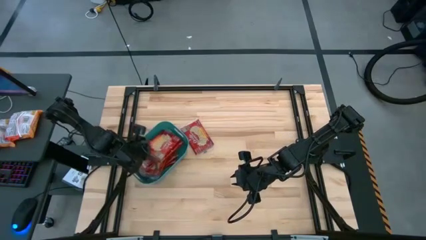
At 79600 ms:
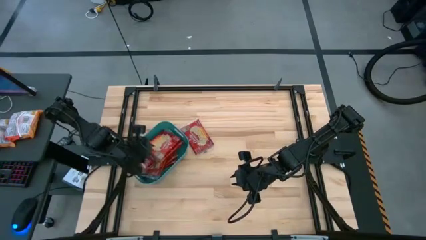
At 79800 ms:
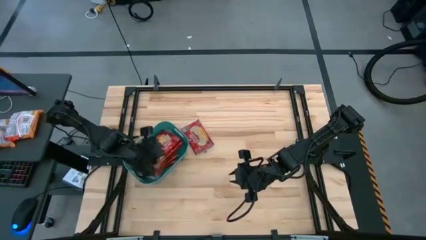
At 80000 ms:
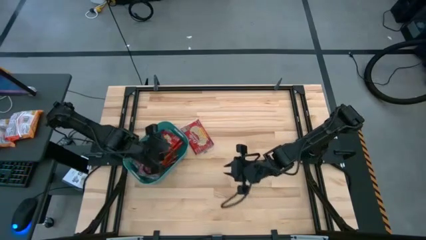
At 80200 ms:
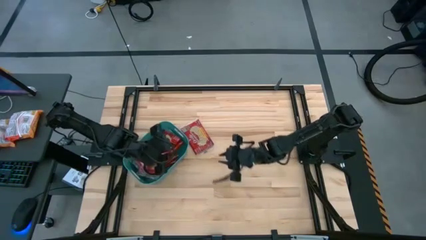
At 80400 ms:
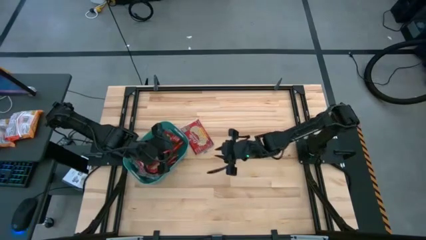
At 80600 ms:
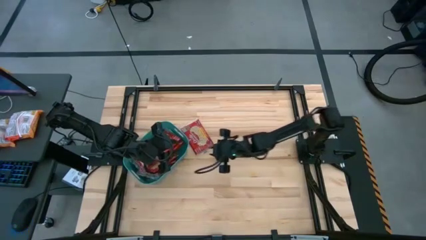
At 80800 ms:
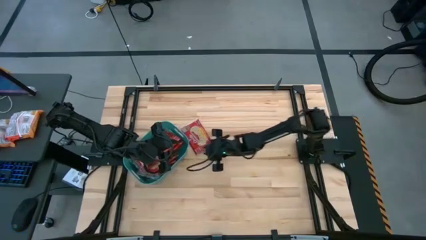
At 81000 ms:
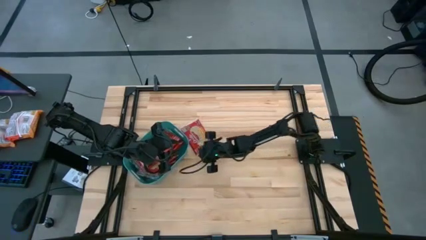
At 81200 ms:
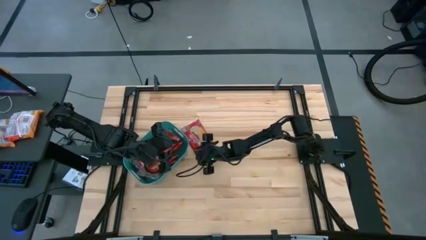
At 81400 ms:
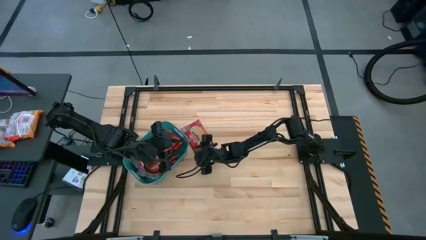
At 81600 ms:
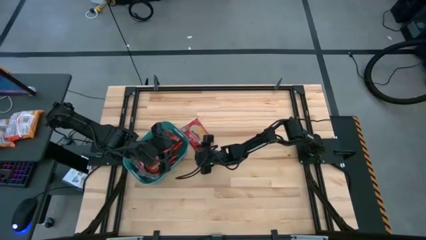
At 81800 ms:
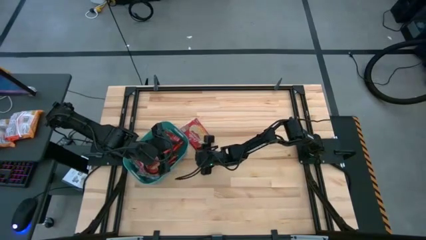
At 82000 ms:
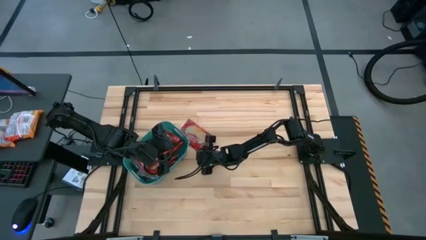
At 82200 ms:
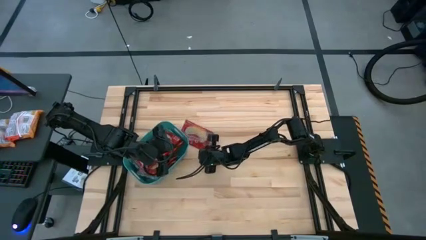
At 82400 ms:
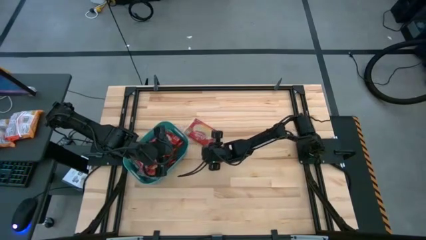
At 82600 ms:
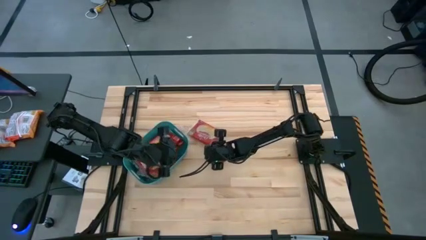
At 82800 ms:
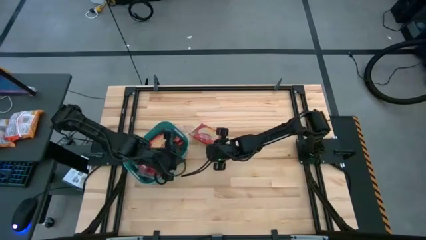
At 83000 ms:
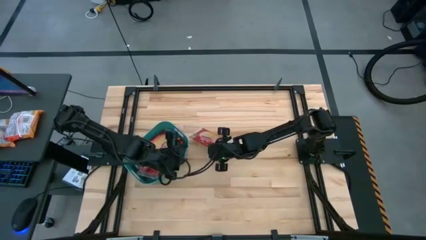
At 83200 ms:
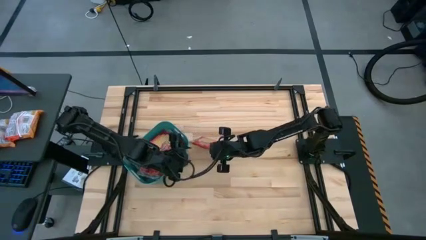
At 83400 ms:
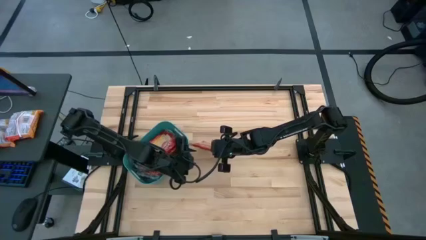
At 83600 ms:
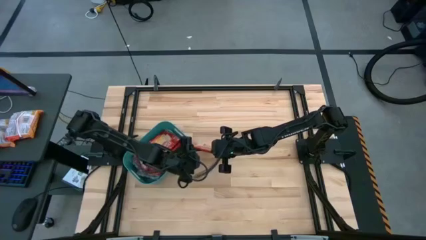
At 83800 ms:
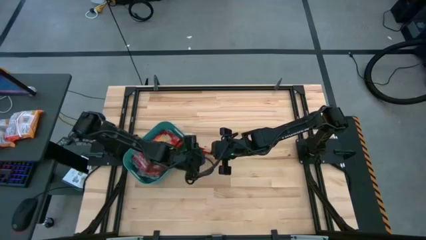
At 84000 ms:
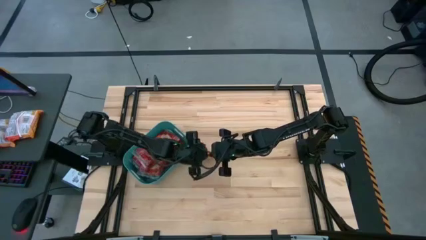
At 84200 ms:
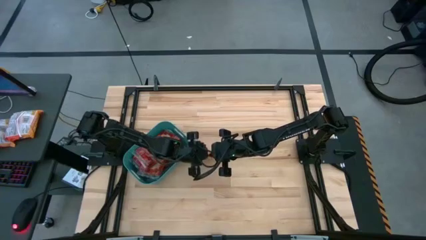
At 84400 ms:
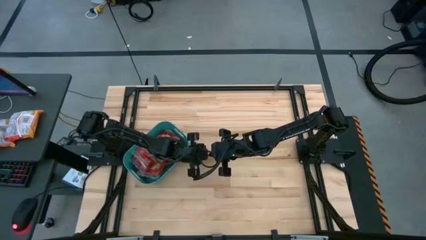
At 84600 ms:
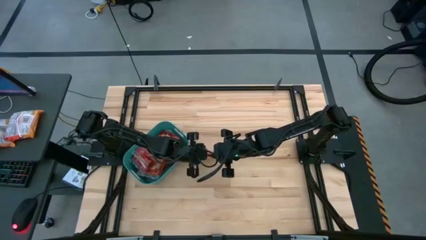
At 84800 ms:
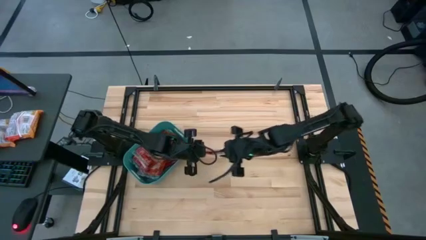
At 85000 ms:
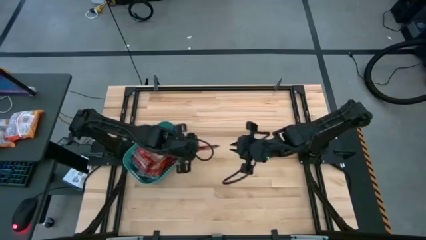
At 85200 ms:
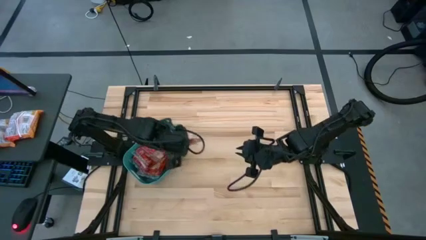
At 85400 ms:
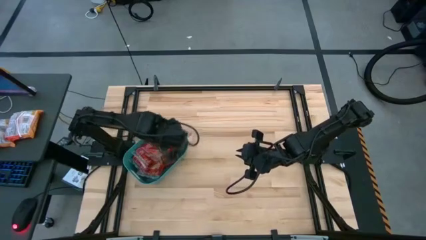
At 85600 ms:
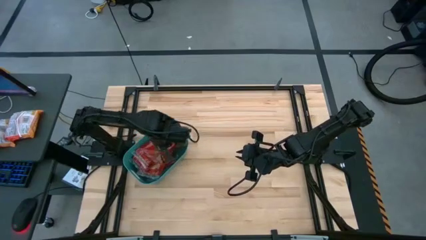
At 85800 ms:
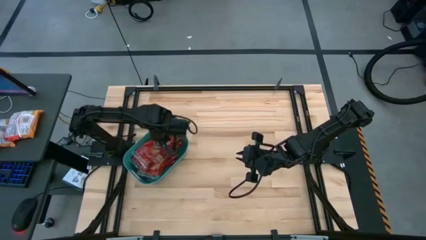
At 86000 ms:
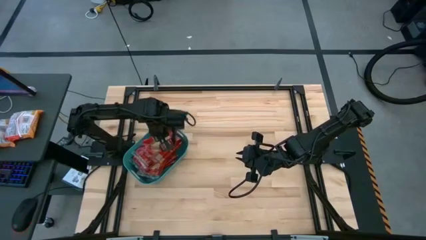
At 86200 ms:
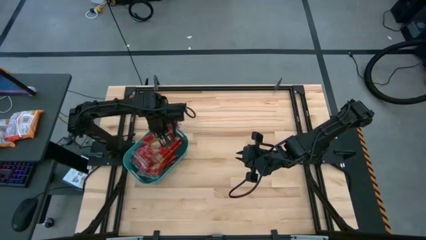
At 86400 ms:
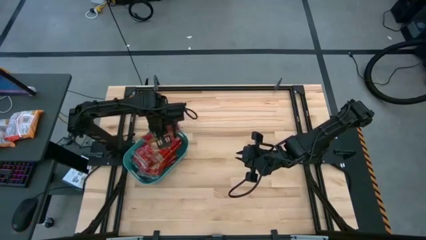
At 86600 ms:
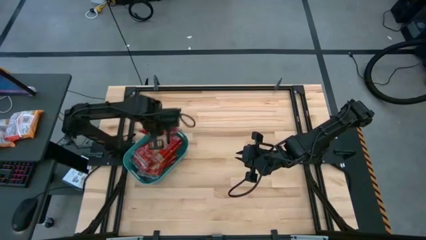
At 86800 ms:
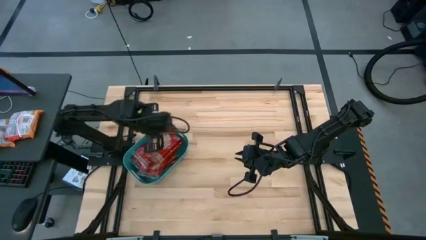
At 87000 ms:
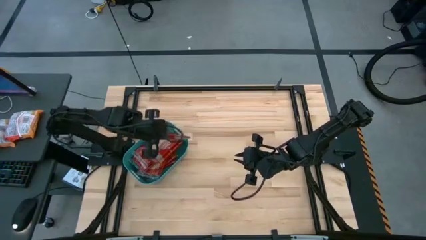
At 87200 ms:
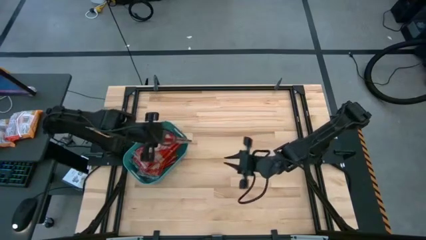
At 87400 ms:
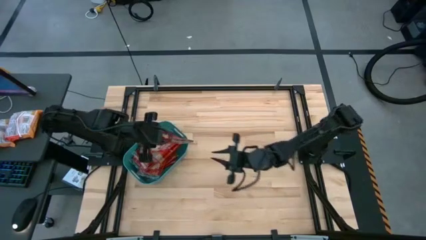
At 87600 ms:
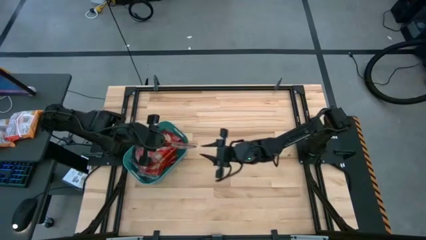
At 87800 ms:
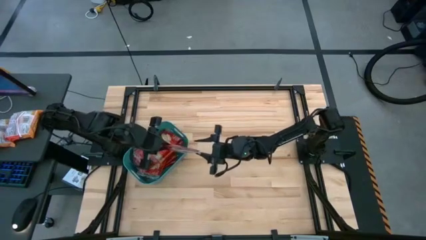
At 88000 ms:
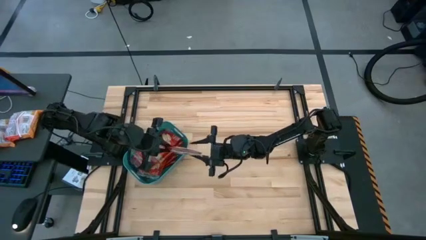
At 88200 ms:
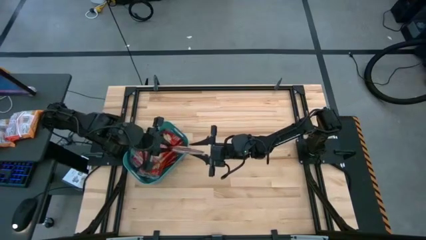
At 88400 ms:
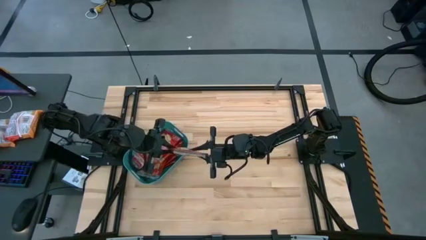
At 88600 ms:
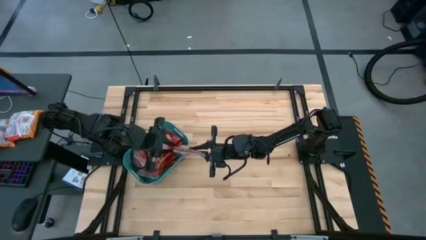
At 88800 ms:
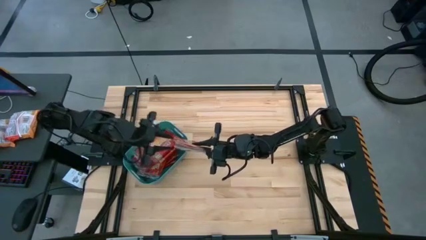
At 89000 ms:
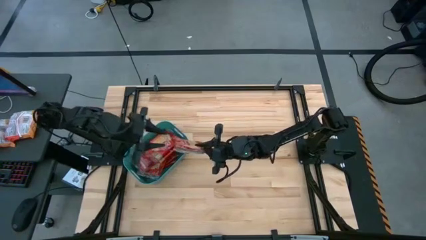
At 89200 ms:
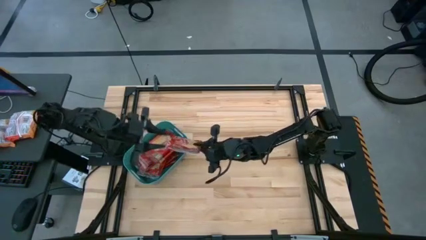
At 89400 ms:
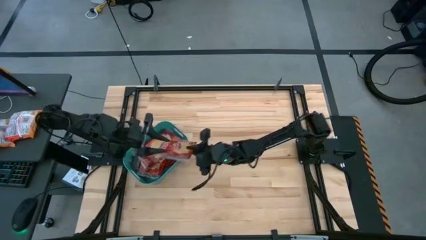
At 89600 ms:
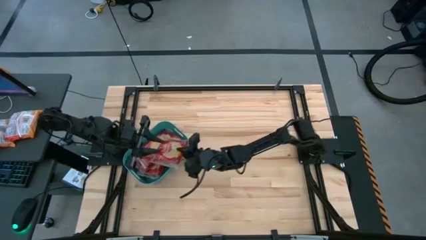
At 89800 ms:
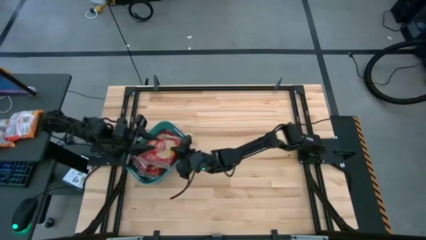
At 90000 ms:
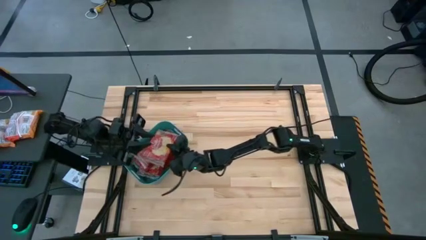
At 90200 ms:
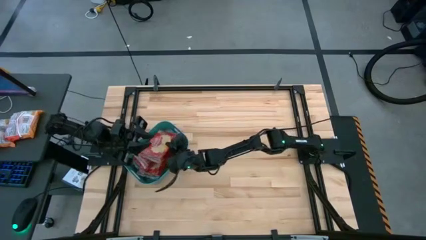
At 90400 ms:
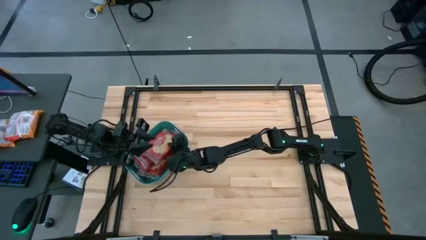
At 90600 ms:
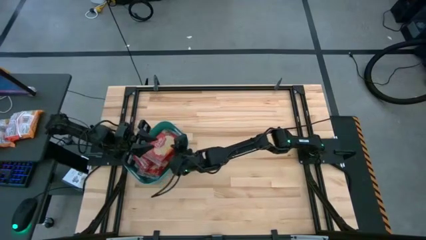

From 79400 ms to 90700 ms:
Task: Sort popcorn bags into baskets
Put the red popcorn bag into the green bin

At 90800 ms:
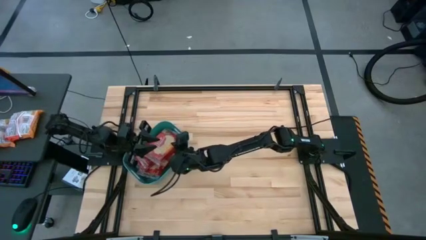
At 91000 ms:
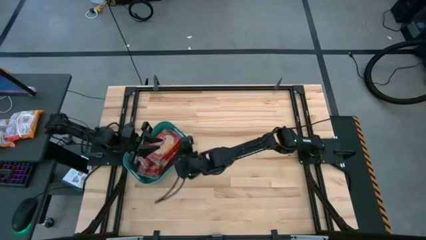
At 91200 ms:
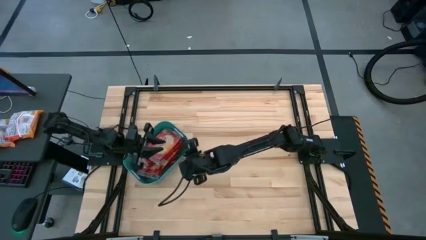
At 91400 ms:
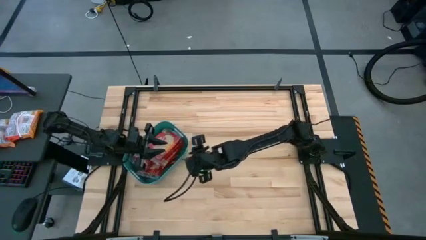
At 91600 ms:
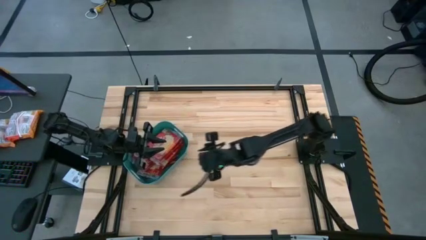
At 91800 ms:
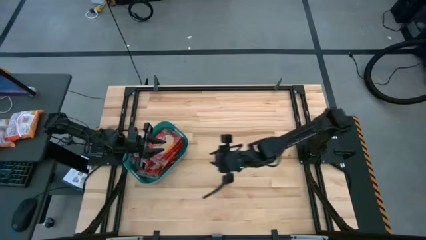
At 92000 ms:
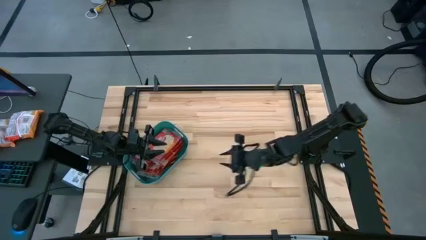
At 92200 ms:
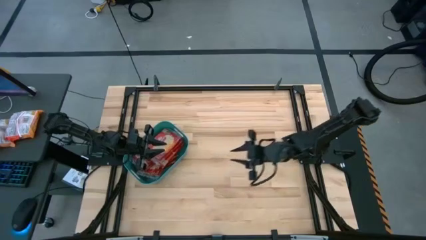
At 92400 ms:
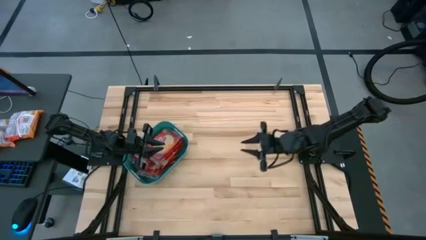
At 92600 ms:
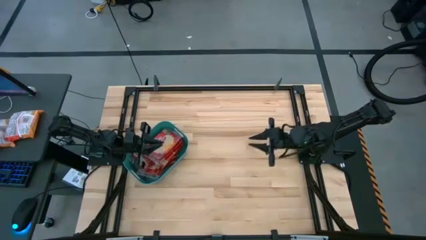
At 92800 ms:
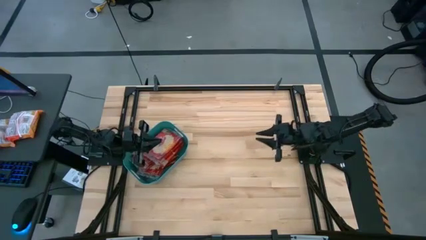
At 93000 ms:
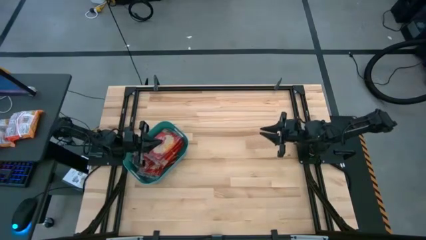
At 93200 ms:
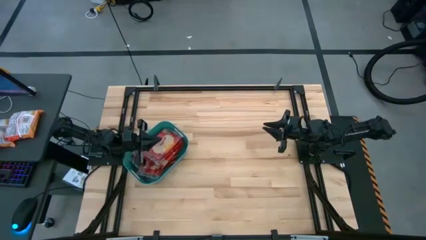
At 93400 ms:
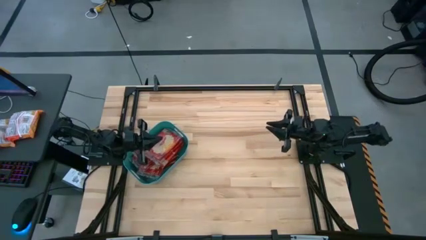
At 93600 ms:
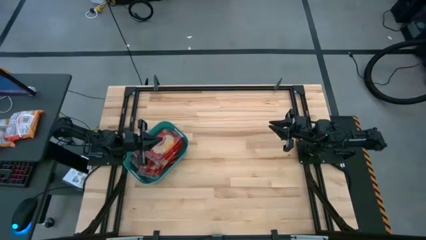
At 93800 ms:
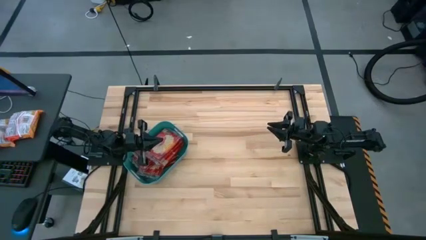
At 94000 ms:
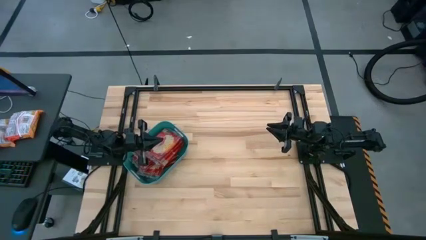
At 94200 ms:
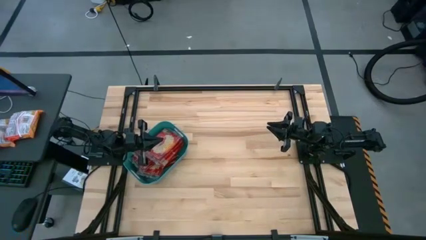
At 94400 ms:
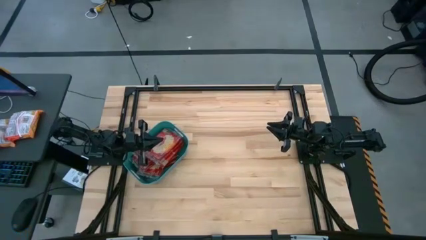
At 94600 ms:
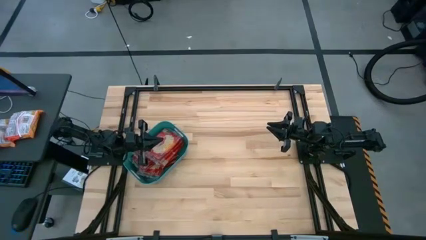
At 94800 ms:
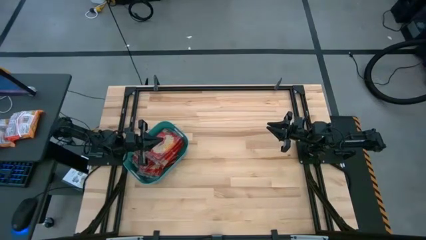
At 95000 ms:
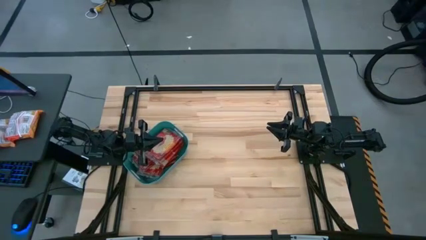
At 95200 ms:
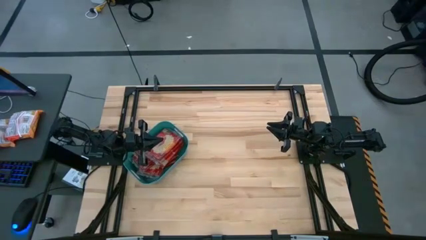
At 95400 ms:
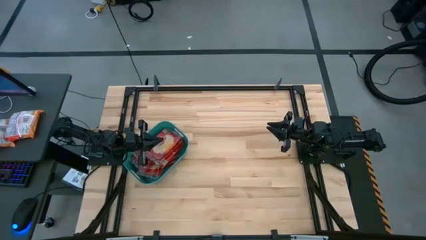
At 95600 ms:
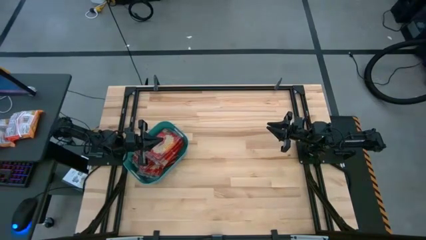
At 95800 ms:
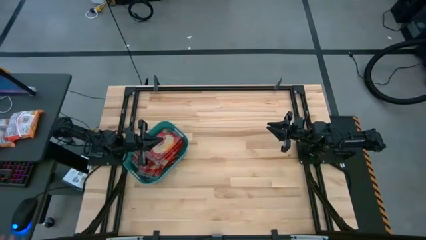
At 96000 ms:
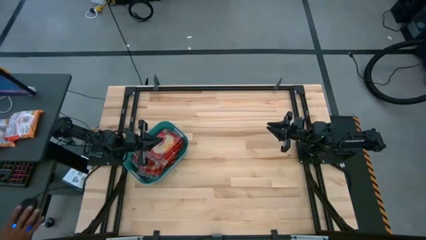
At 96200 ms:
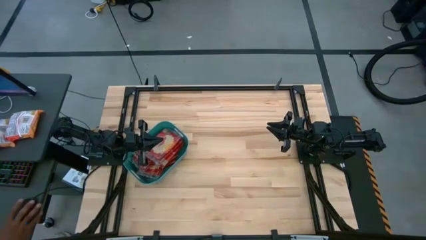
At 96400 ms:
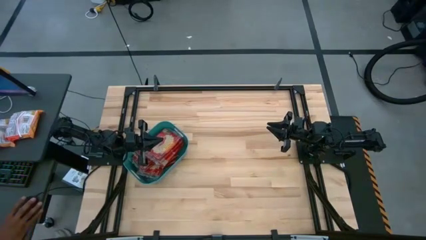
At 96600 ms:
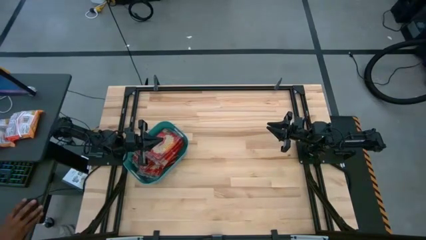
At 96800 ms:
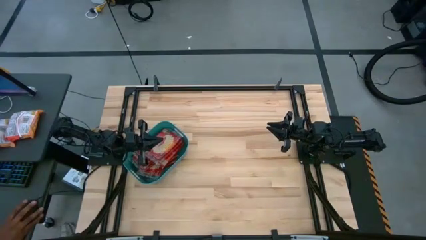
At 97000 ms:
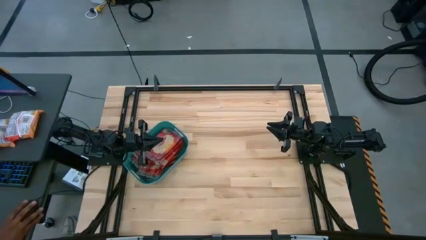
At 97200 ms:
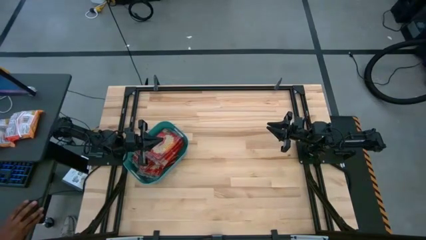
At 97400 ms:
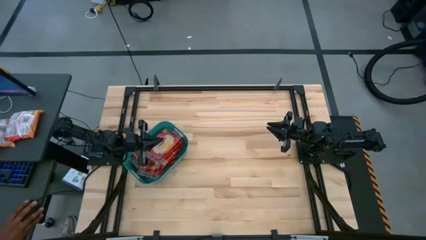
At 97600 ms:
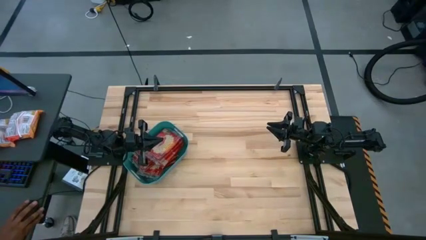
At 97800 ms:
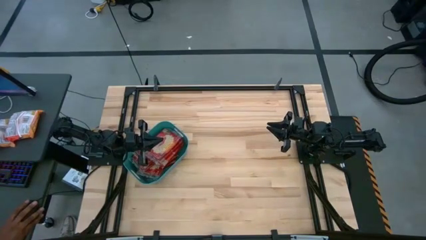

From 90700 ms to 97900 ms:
Return to Home Position
